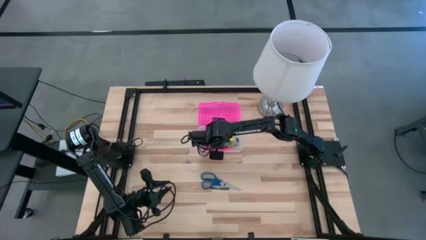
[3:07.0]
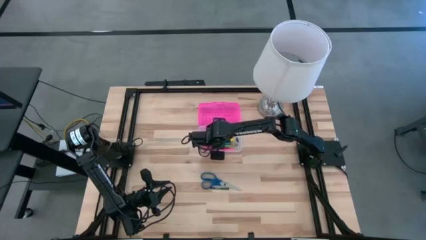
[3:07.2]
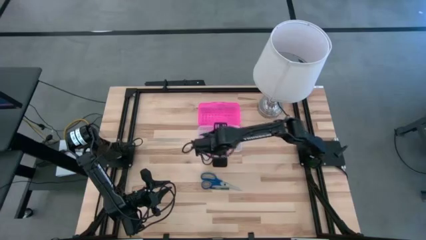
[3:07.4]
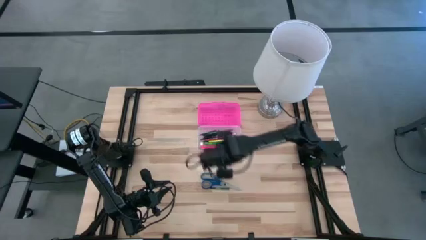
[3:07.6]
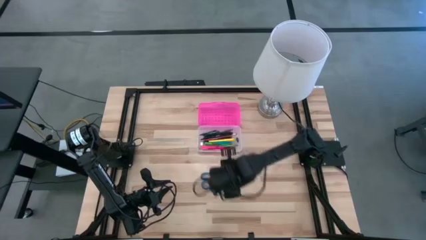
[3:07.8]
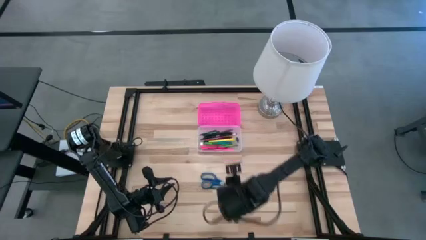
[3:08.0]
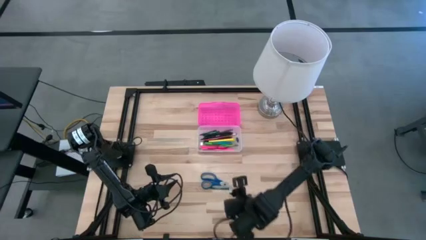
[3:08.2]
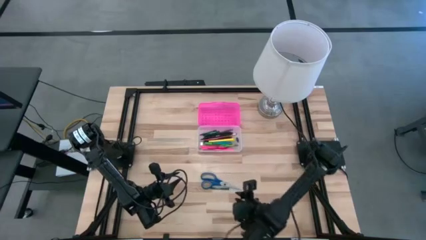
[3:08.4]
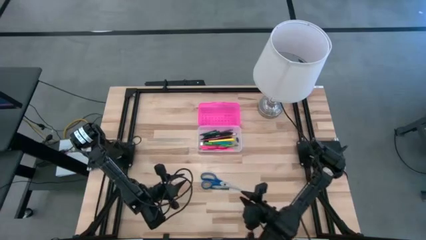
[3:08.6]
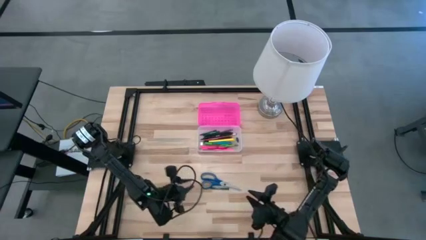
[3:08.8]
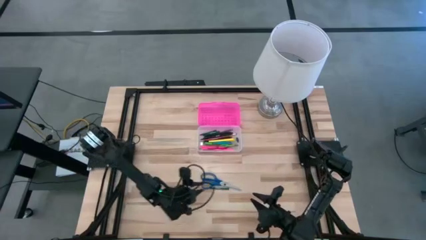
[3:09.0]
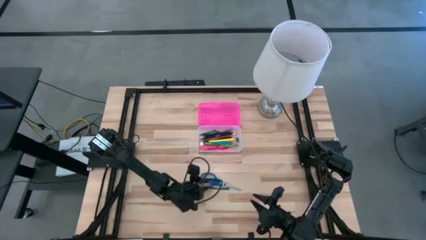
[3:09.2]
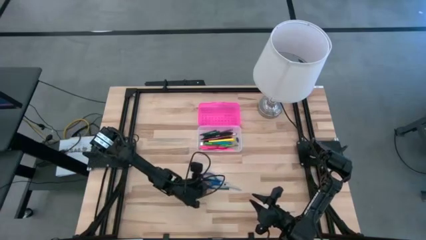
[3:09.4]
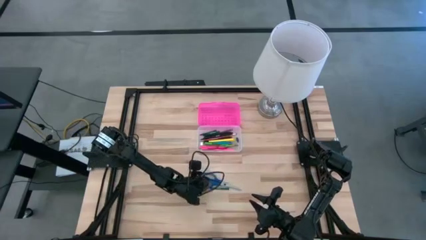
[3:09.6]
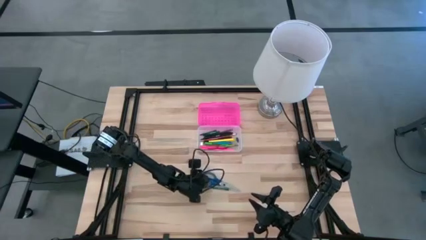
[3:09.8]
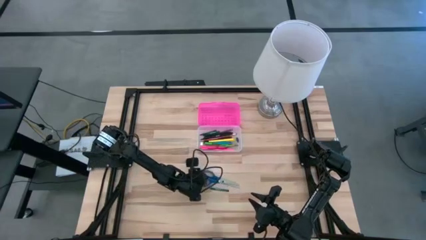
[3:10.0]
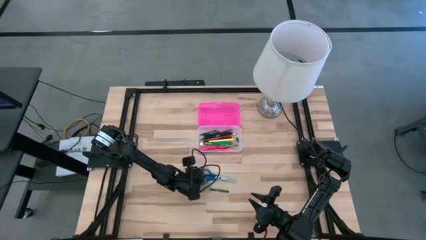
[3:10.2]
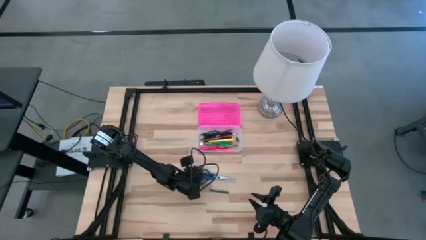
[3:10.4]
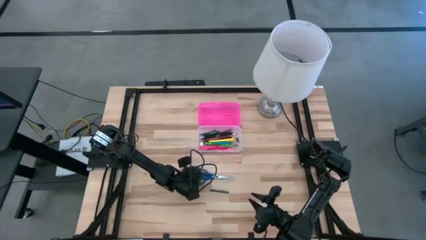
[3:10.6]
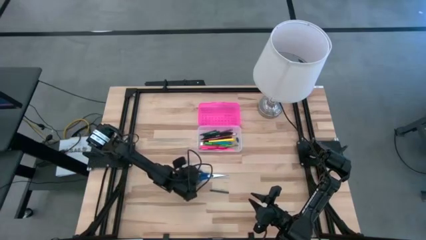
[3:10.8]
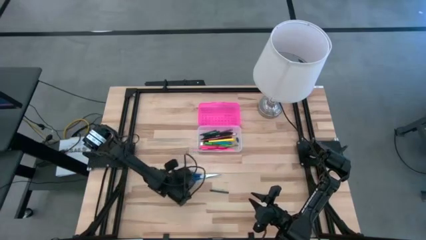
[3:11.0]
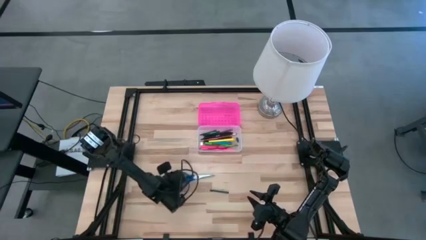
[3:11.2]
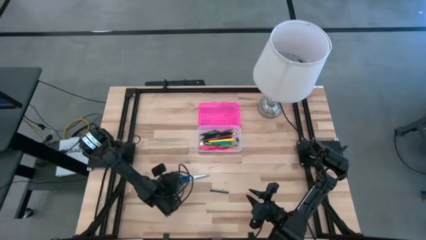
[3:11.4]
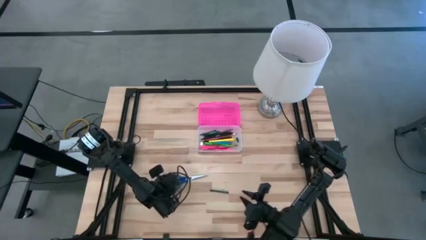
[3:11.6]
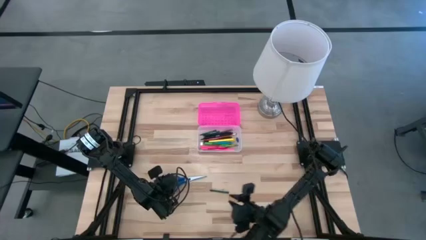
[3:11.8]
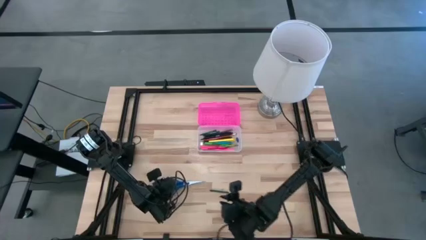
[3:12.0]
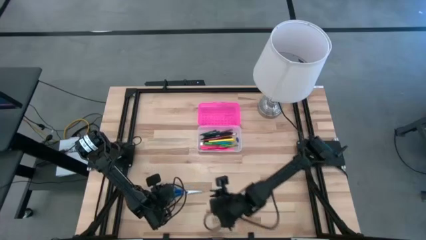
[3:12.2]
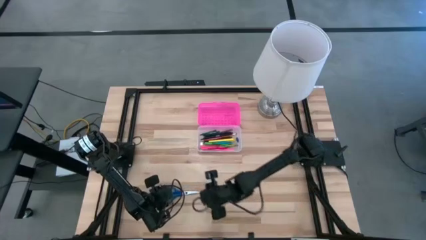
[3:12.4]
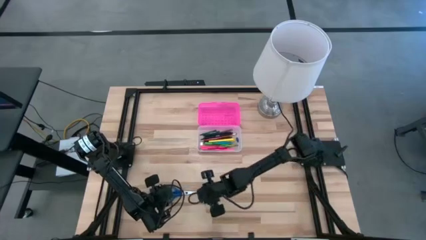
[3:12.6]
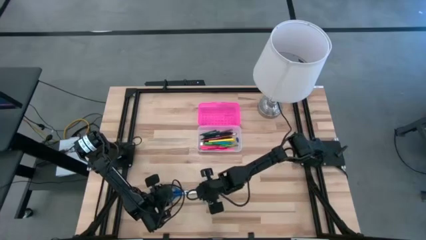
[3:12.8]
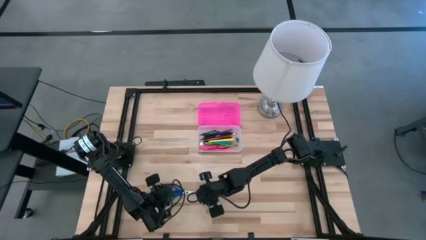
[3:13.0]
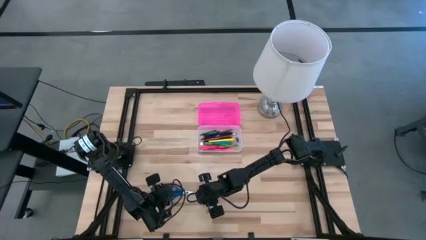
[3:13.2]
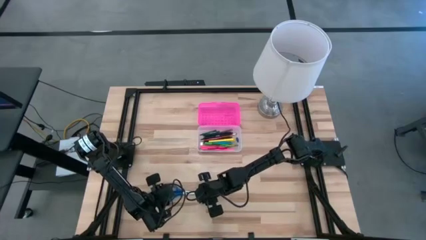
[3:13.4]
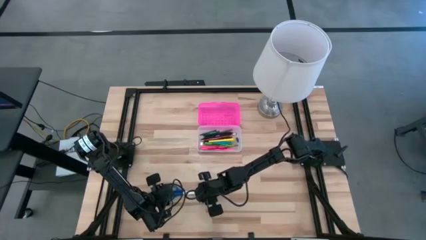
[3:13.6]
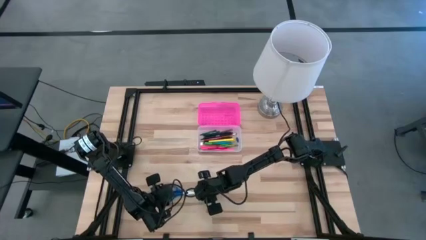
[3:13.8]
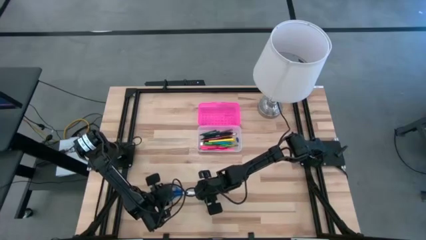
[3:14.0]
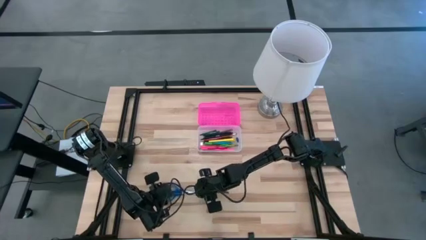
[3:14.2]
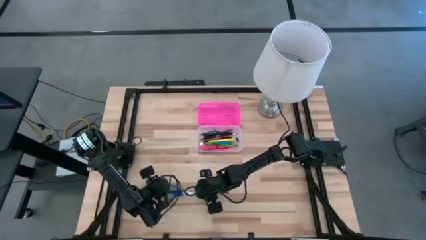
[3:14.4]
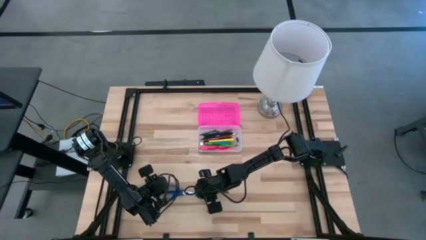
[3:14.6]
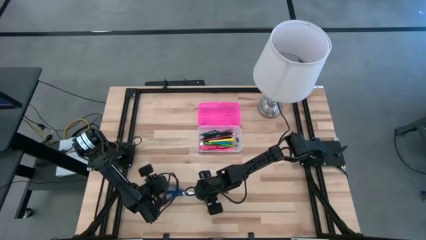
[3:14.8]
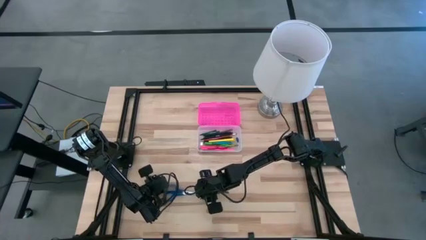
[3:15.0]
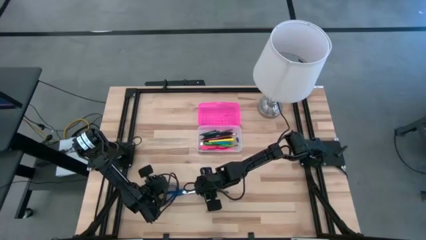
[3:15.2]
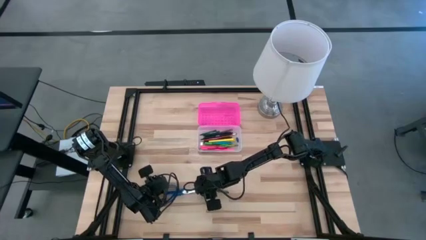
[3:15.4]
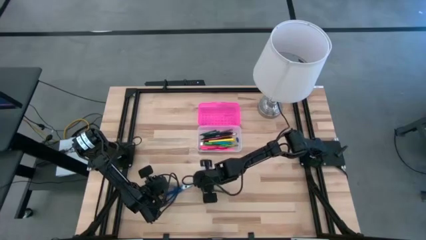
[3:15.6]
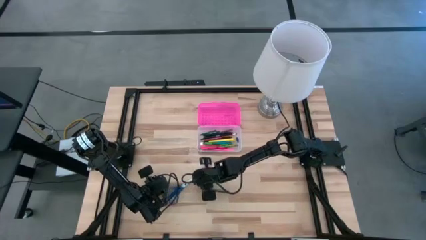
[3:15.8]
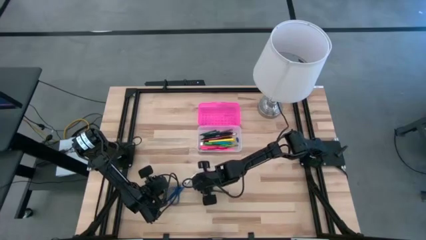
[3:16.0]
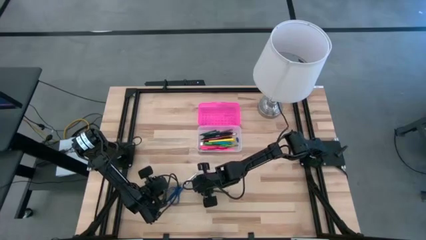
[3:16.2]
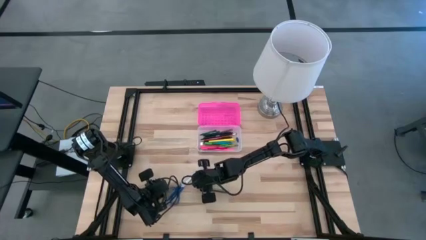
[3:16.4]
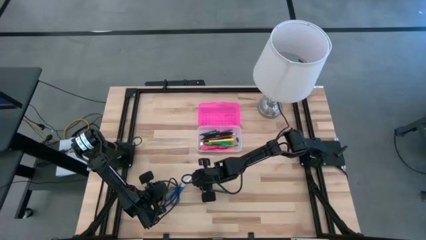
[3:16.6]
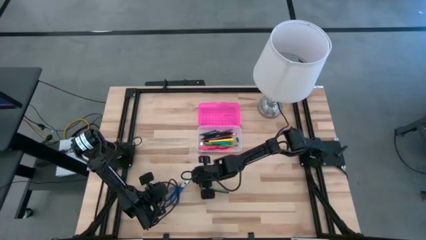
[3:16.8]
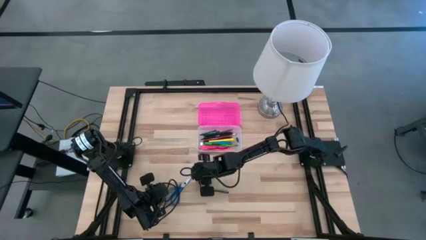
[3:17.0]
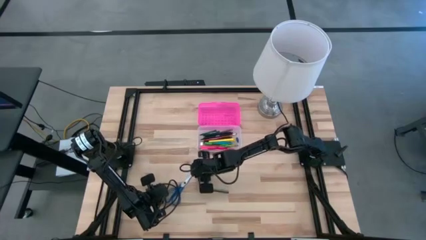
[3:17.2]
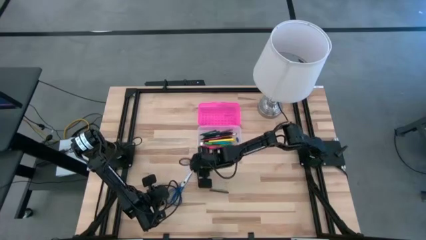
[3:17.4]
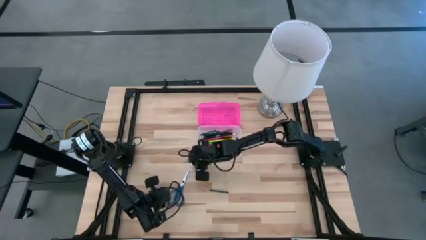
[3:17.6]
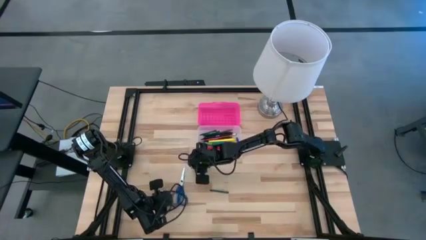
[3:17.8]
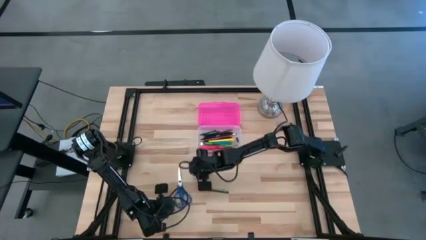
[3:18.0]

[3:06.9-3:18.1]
Task: Pick & place school supplies into a supply box
Put the scissors into the supply box

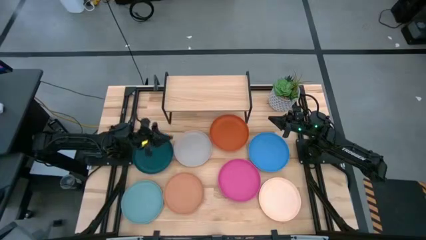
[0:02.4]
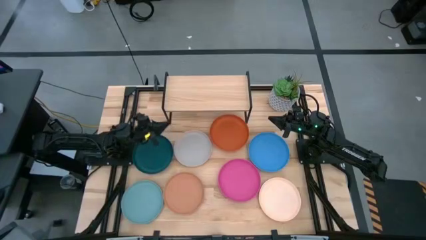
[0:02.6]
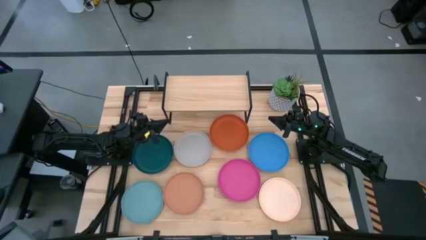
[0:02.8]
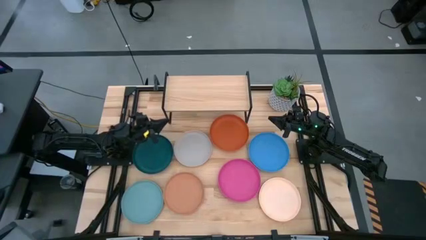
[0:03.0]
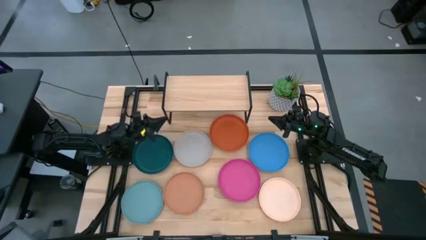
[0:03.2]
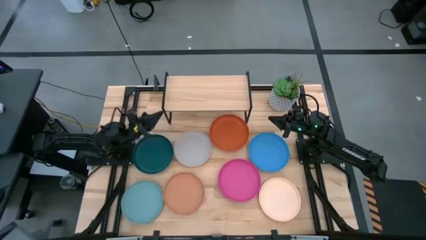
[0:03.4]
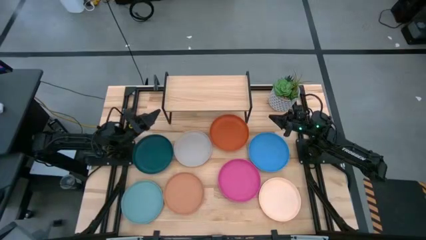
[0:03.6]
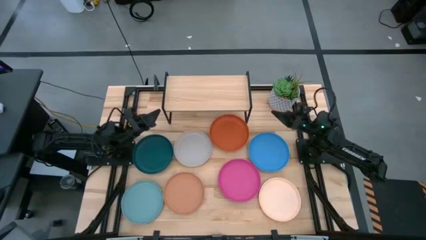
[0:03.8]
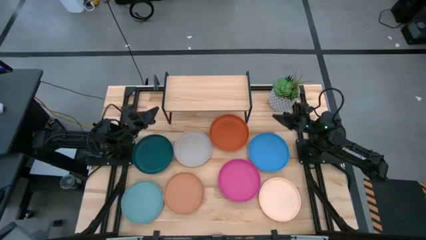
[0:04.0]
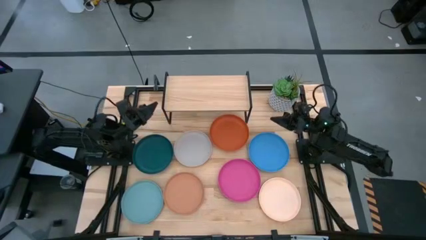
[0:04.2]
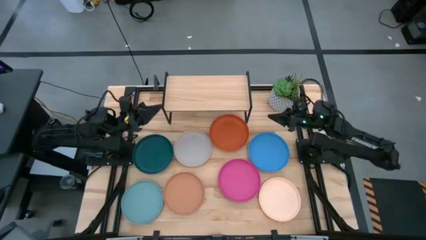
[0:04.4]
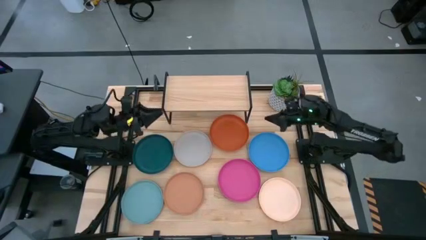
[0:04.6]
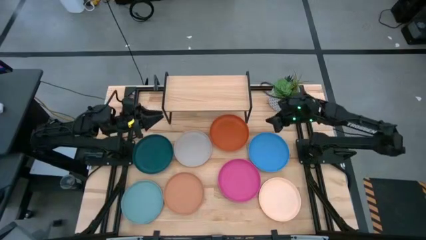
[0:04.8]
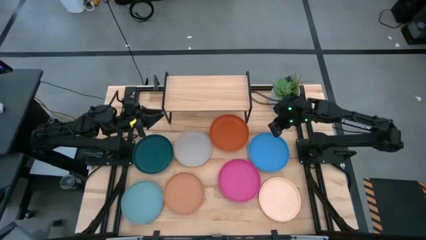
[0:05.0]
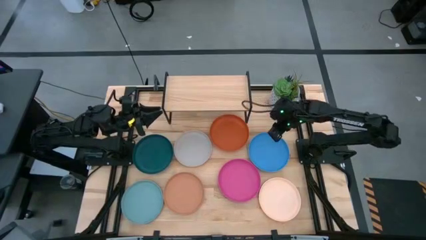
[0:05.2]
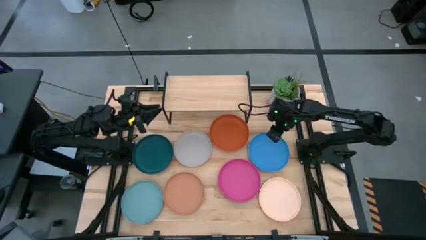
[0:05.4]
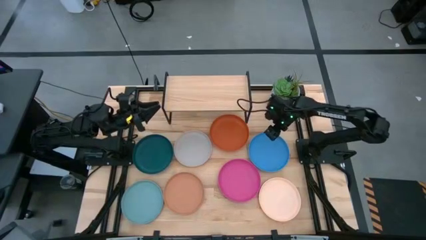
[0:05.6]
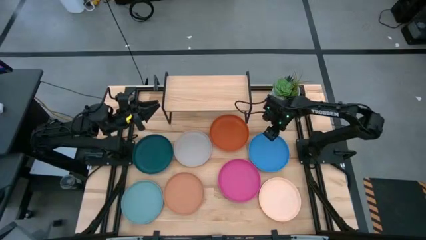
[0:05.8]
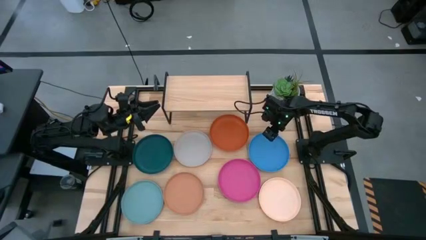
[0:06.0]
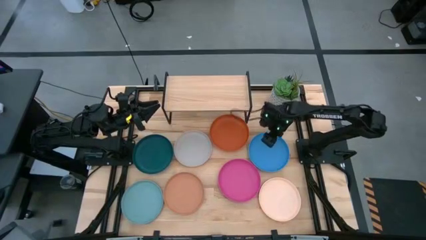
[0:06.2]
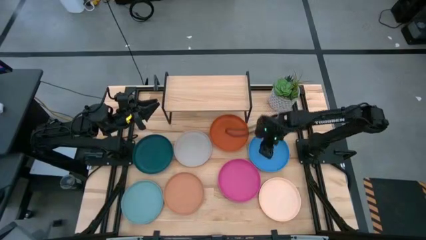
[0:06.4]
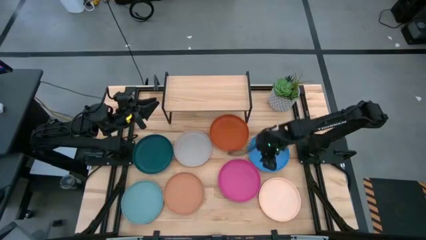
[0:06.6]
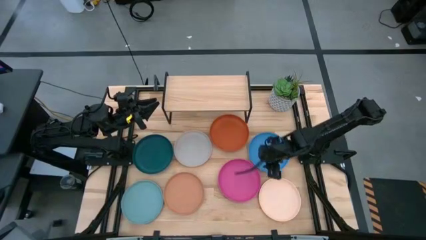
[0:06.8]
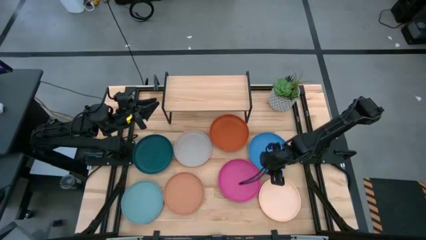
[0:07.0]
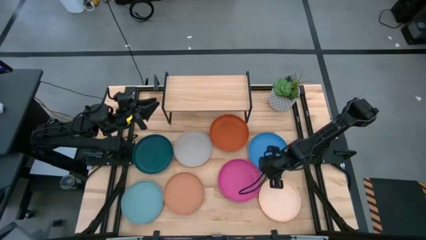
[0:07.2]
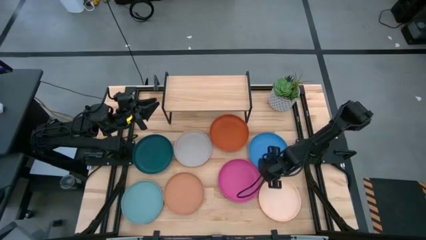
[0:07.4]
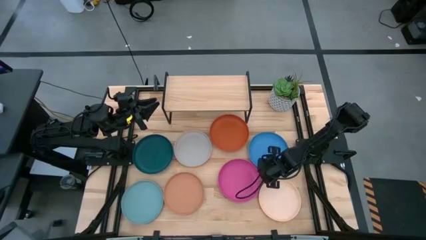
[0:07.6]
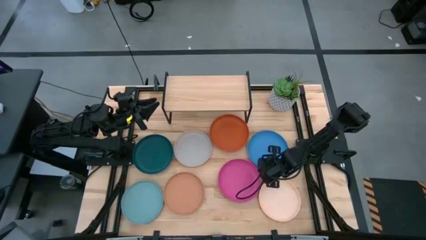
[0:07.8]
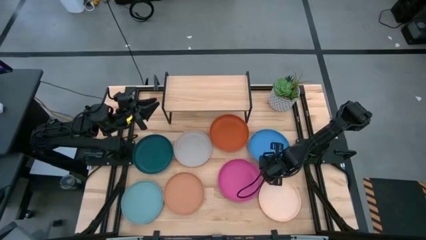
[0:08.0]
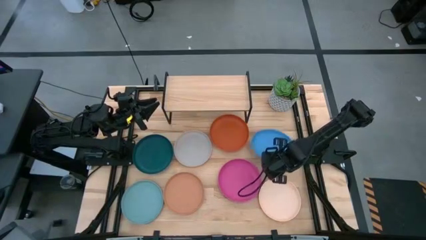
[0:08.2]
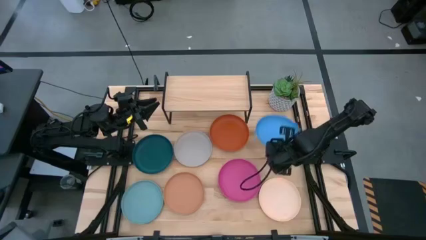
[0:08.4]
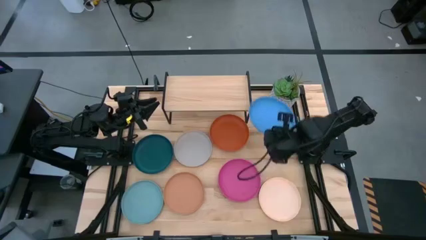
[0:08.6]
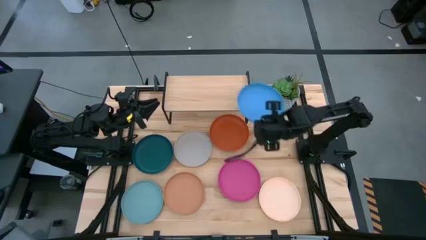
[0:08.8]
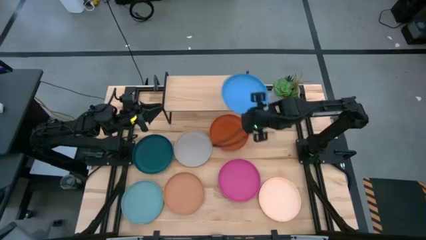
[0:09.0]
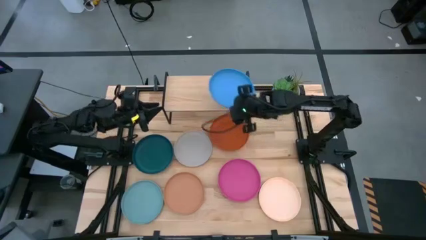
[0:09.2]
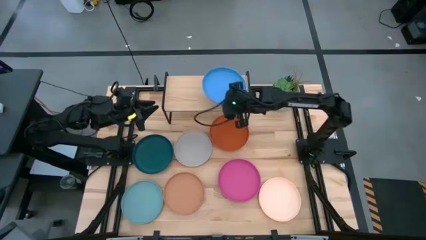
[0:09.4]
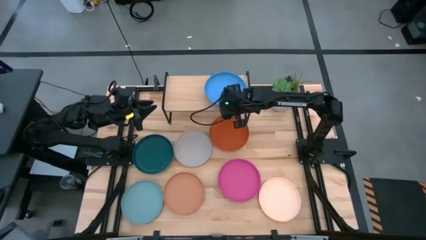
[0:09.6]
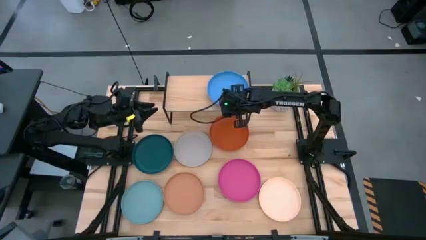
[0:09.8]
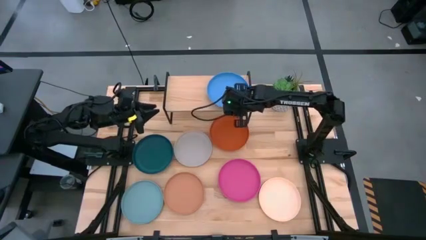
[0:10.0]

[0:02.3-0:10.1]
Task: Place and stack plates onto a shelf
Put the blue plate on the shelf
